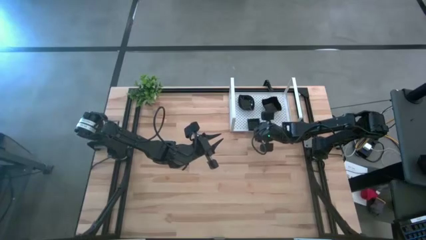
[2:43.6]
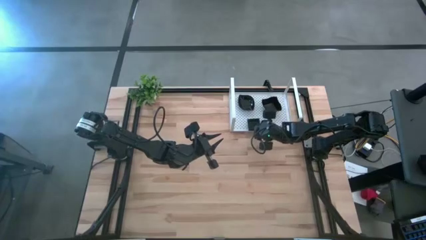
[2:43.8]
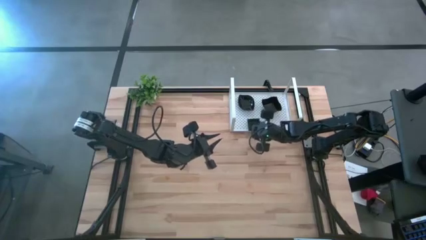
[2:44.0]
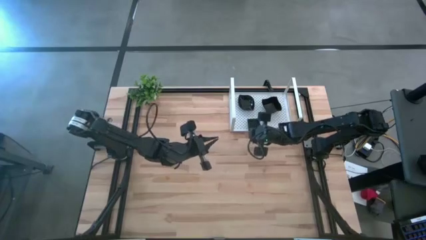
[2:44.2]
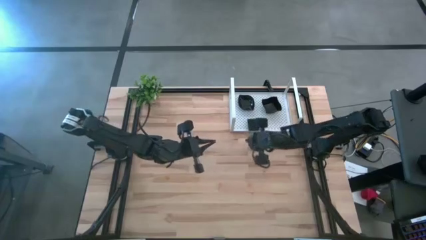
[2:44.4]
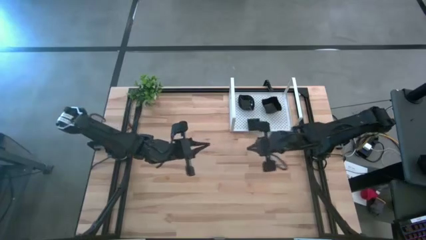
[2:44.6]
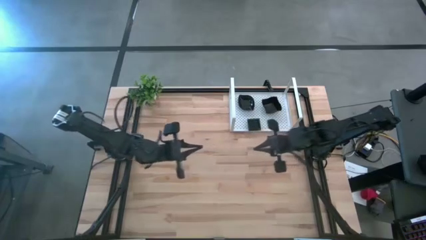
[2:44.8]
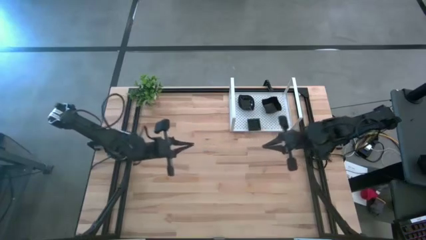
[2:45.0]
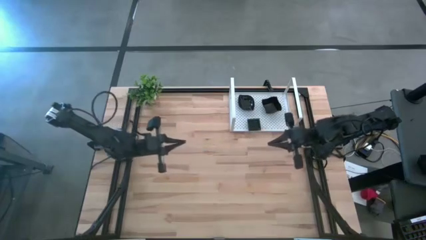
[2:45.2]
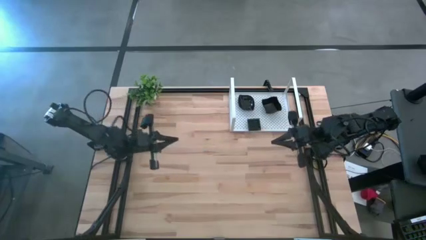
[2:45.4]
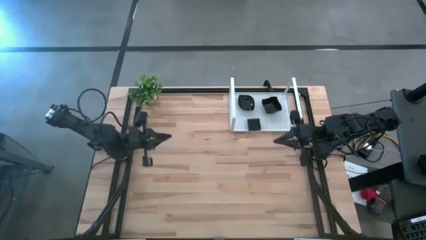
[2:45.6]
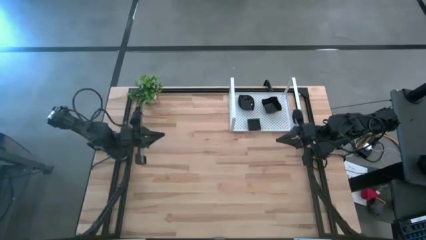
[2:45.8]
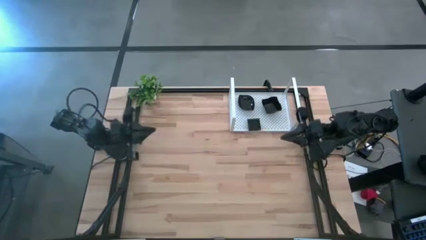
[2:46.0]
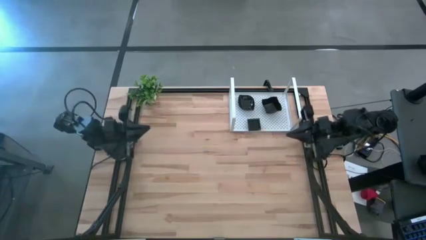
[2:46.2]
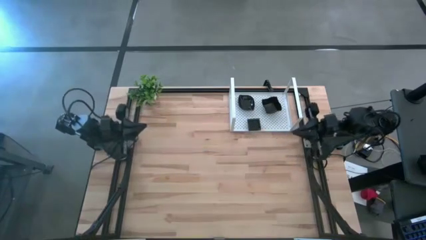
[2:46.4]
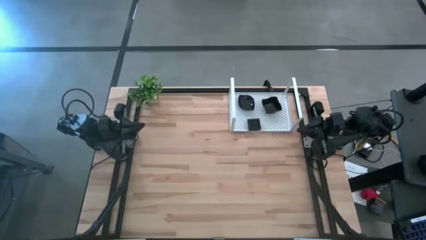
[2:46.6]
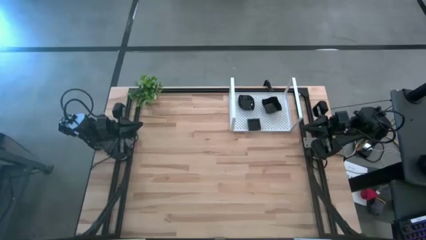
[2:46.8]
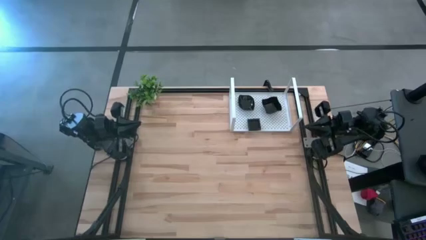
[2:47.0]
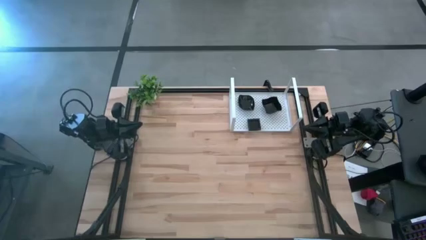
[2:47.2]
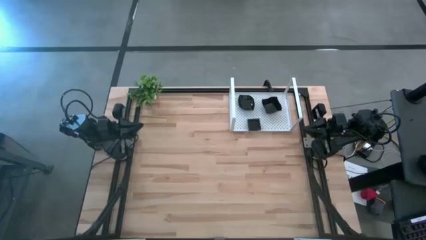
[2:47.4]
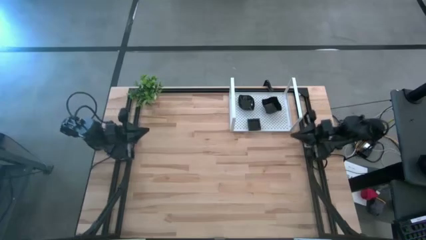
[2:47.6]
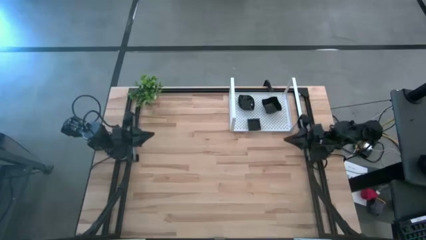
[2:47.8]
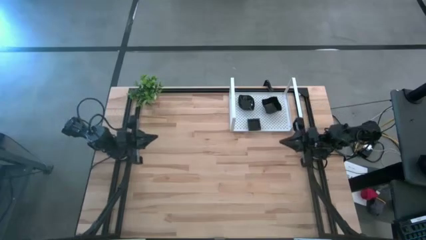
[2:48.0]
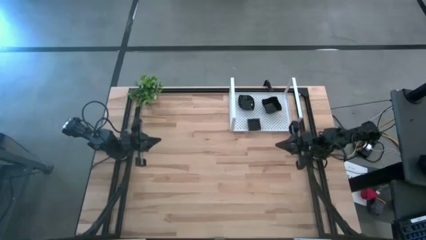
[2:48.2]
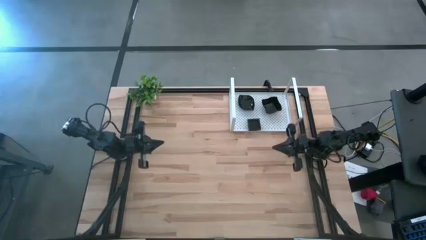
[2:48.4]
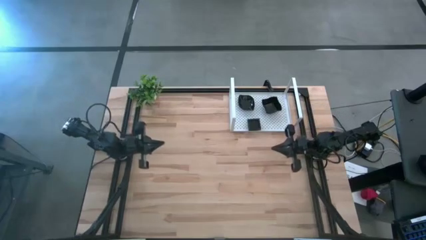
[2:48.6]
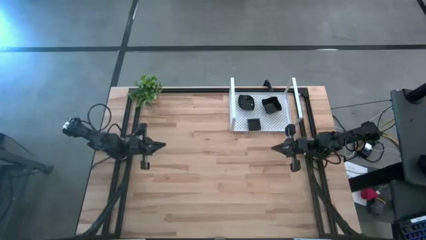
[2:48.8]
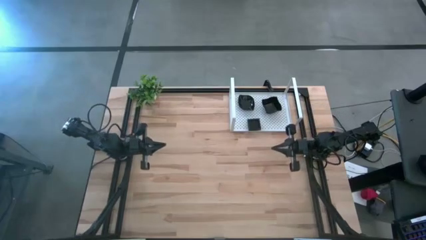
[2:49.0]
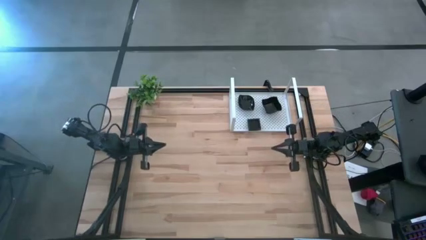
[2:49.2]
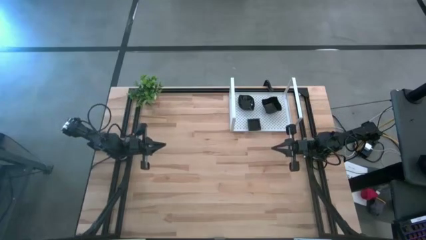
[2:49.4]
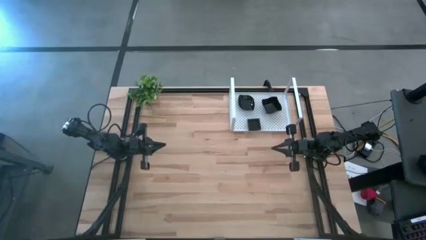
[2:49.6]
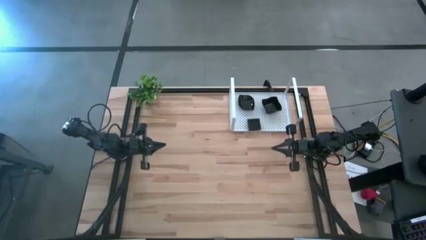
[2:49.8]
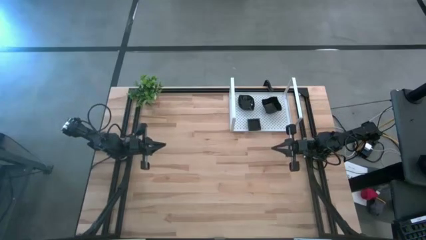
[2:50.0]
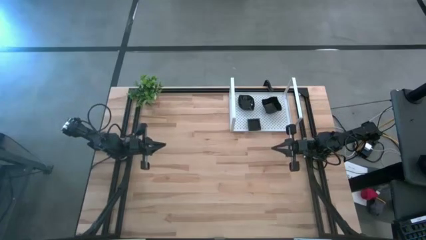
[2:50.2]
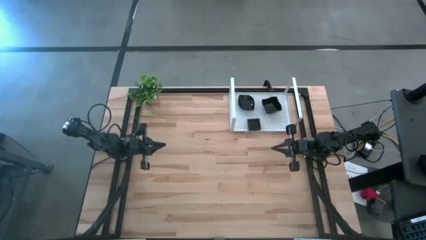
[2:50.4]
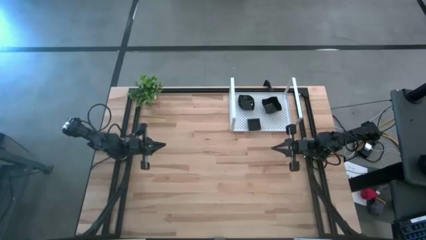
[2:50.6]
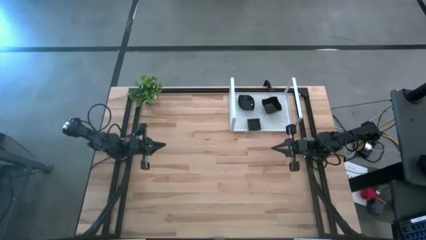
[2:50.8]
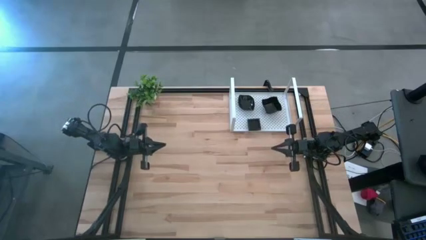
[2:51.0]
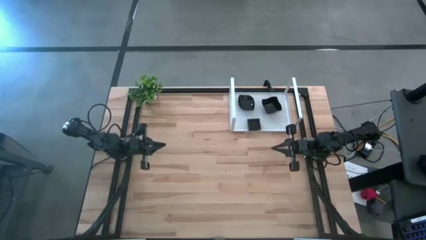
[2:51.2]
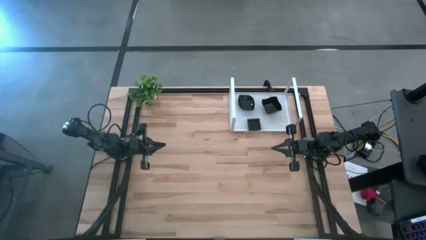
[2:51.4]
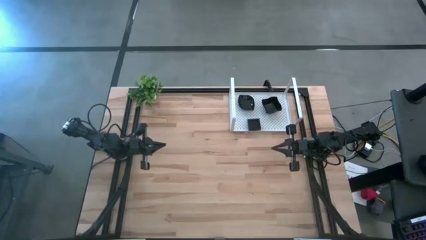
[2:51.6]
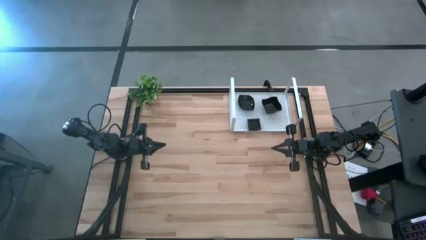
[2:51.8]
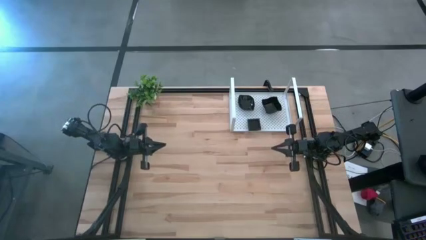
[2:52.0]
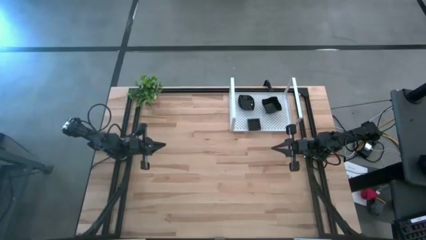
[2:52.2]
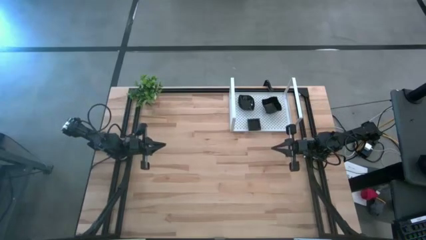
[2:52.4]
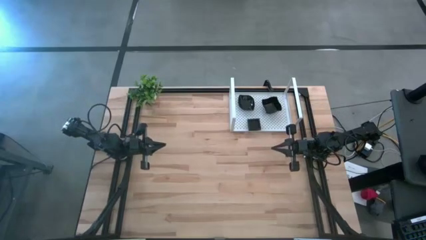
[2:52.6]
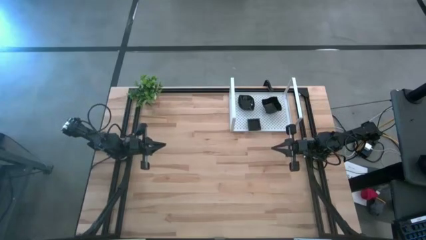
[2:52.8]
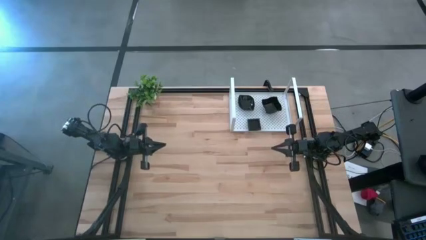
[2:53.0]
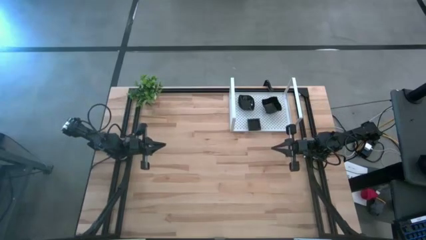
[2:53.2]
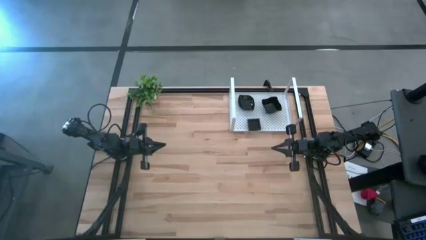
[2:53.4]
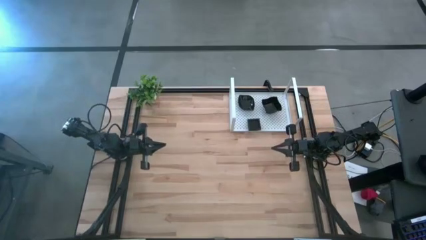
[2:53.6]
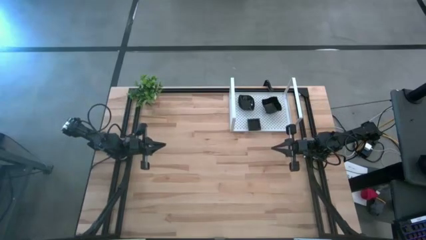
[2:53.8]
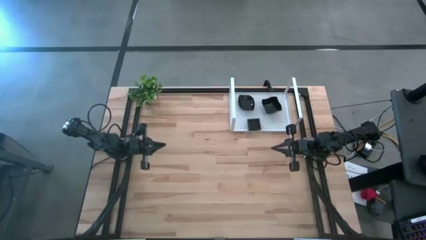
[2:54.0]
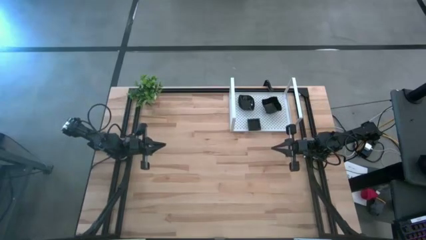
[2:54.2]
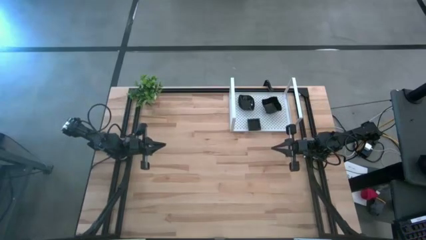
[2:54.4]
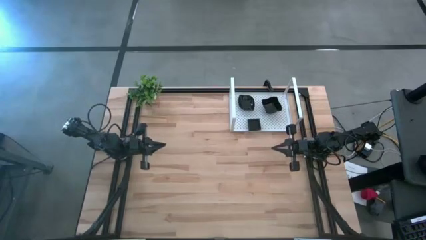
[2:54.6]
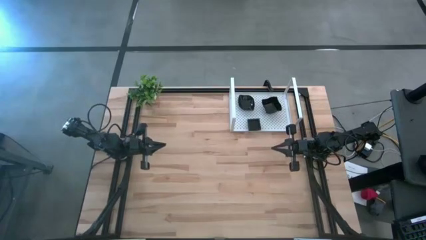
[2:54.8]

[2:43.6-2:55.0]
Task: Pick & Place Mini shaped plates
Return to Home Position
